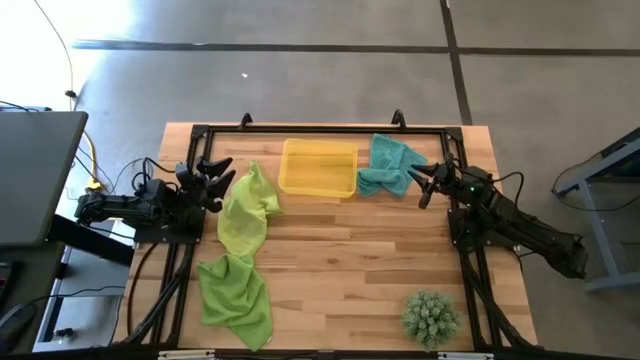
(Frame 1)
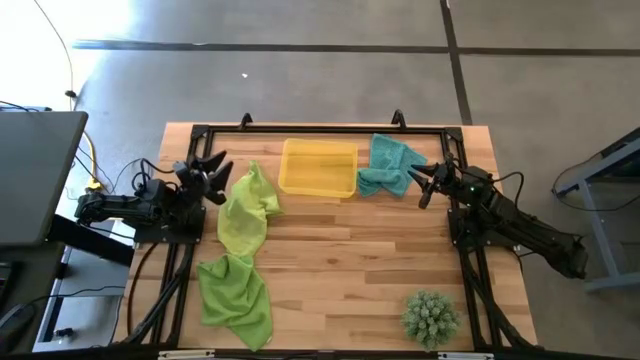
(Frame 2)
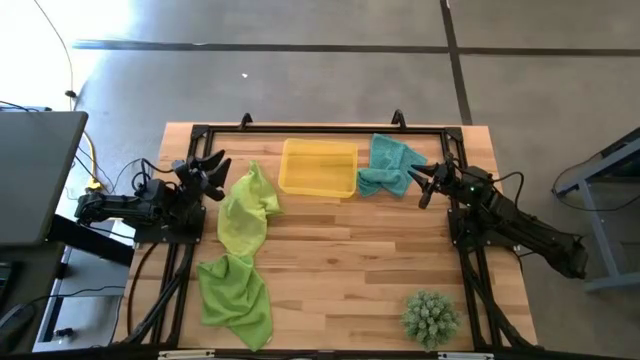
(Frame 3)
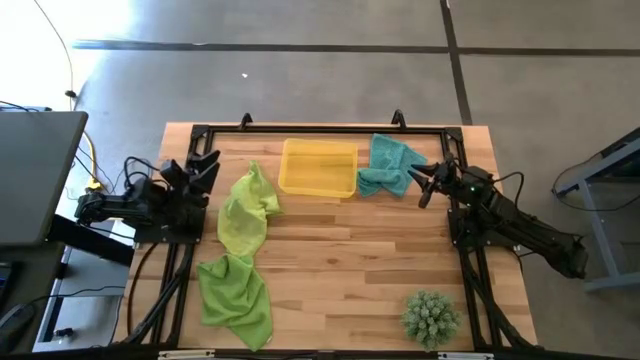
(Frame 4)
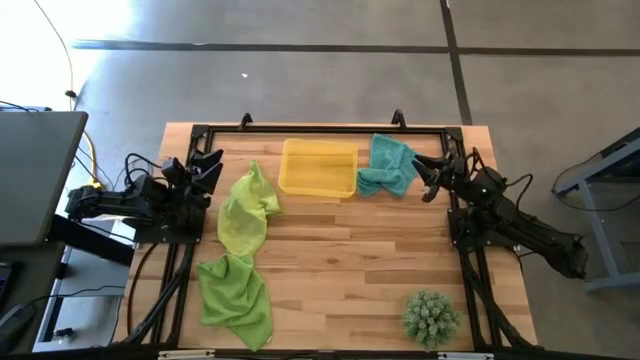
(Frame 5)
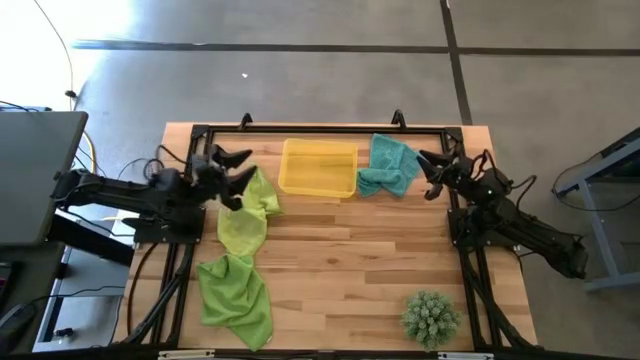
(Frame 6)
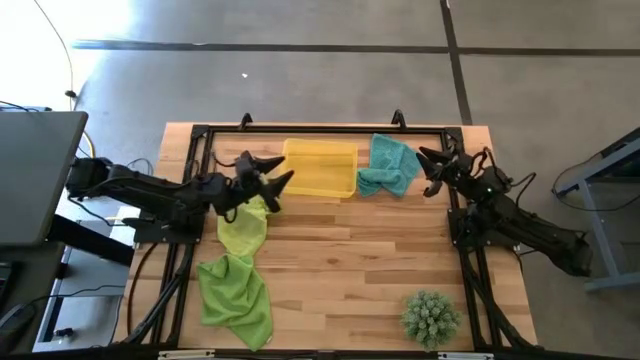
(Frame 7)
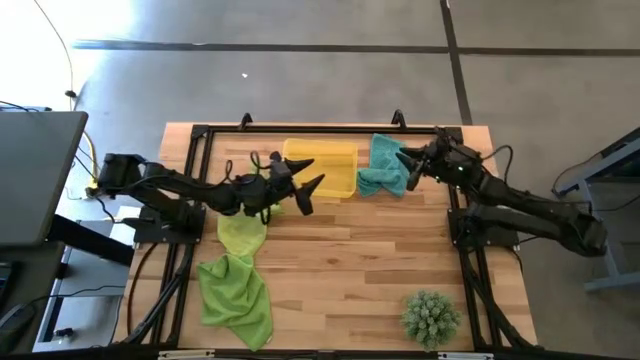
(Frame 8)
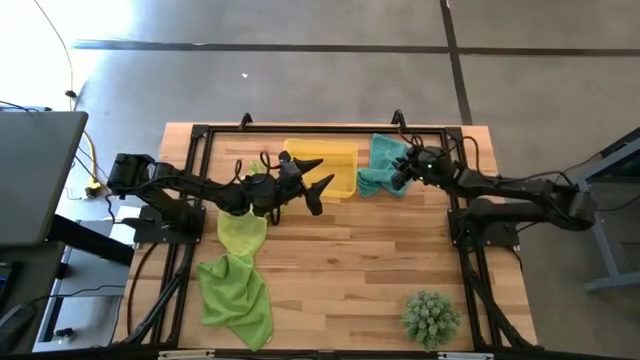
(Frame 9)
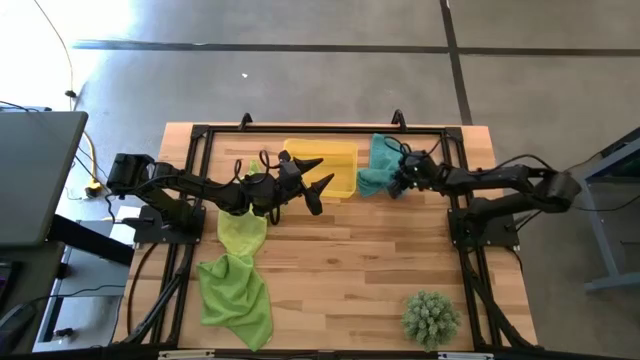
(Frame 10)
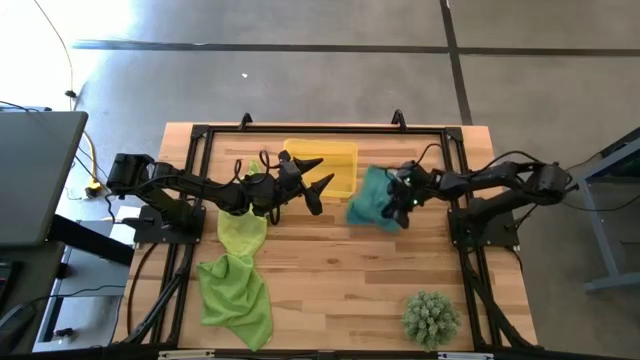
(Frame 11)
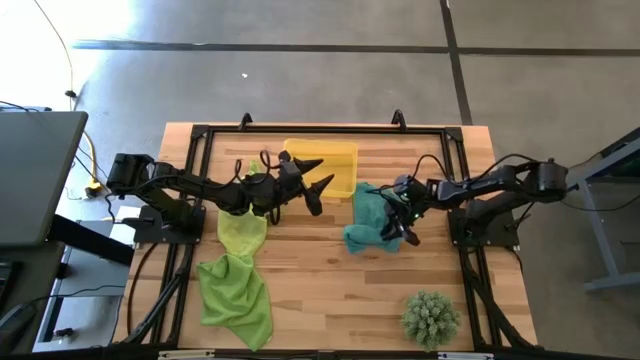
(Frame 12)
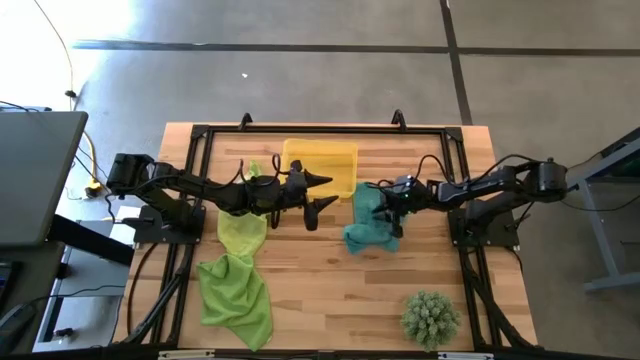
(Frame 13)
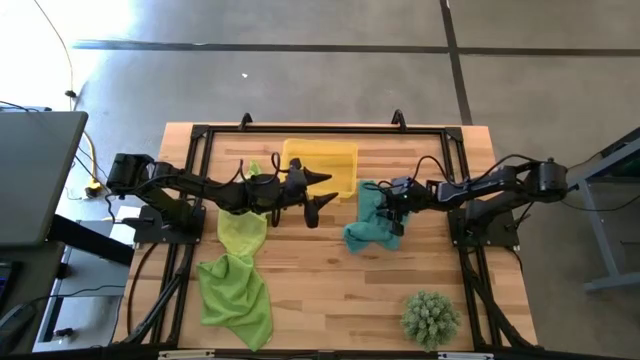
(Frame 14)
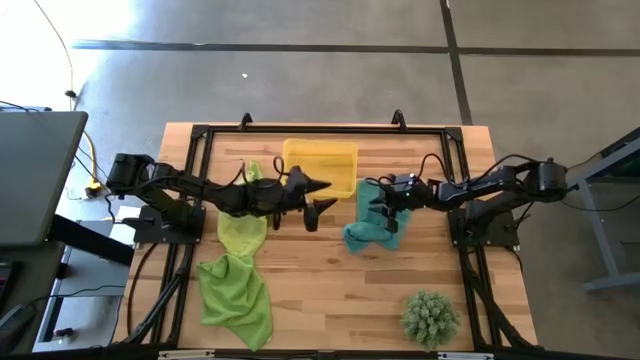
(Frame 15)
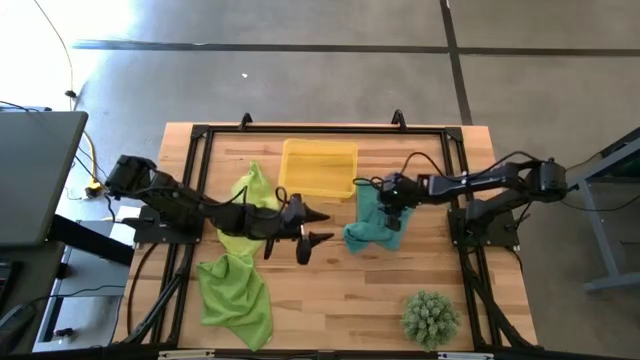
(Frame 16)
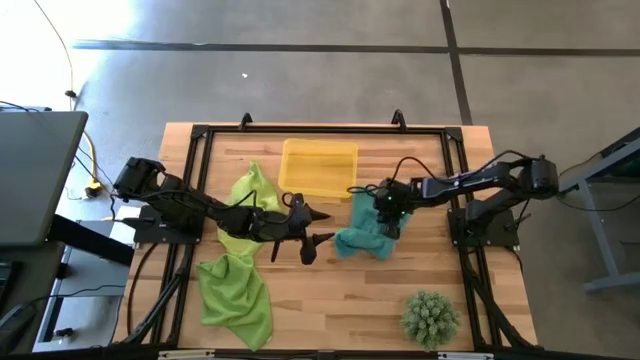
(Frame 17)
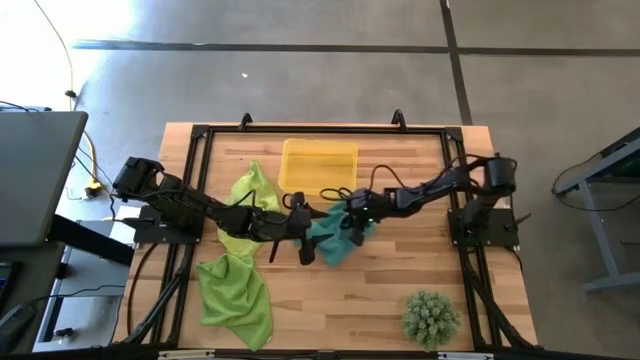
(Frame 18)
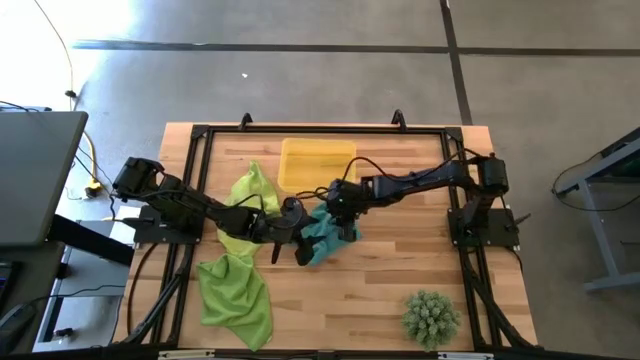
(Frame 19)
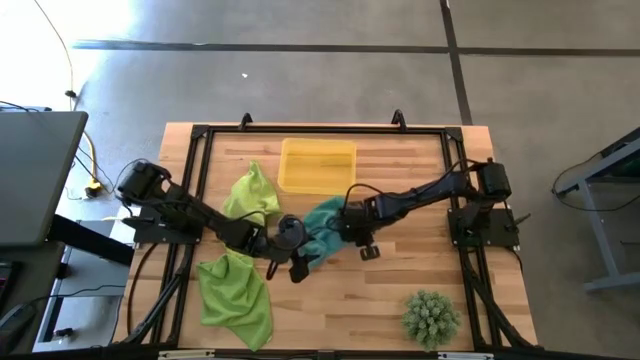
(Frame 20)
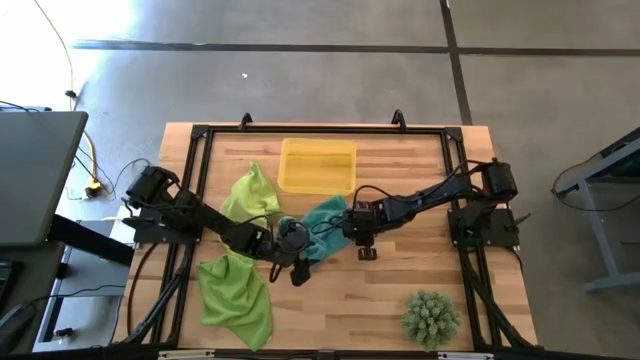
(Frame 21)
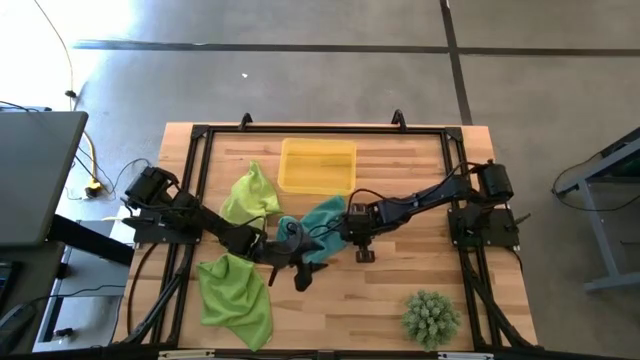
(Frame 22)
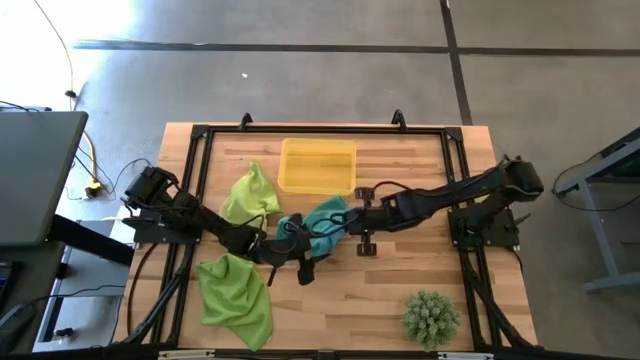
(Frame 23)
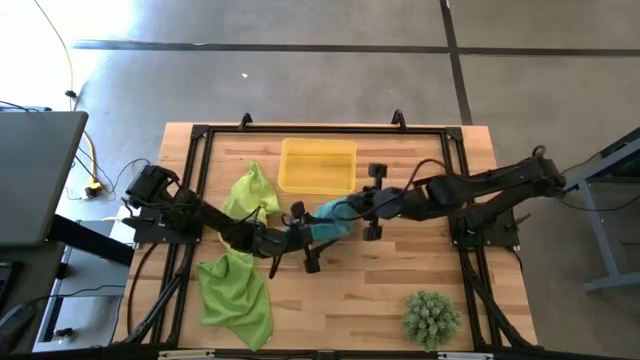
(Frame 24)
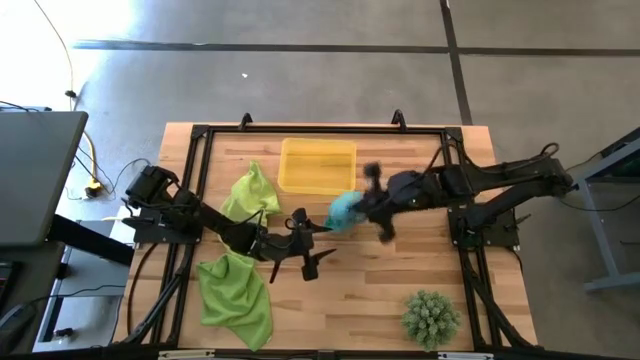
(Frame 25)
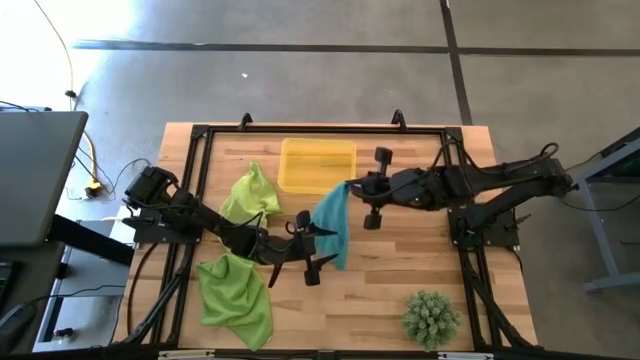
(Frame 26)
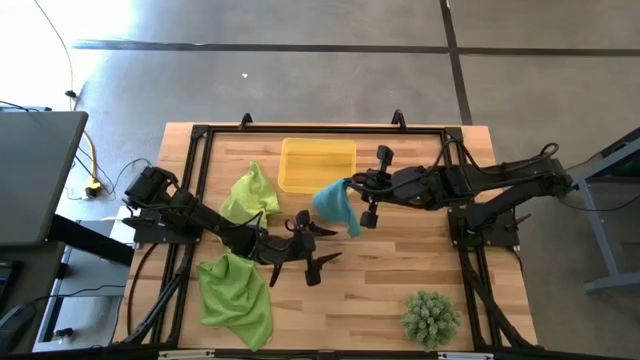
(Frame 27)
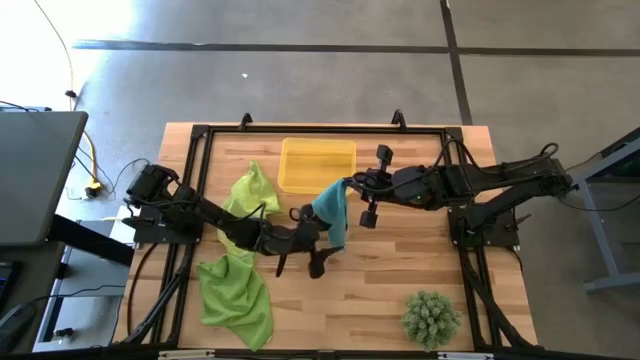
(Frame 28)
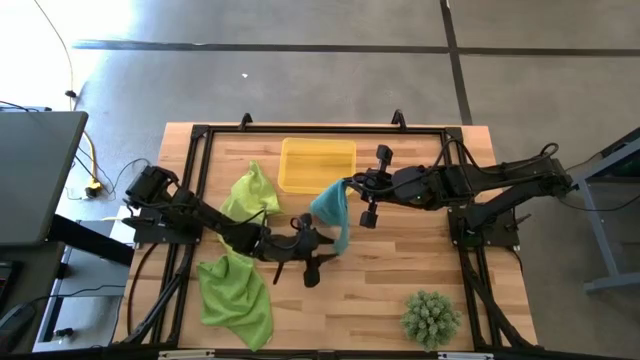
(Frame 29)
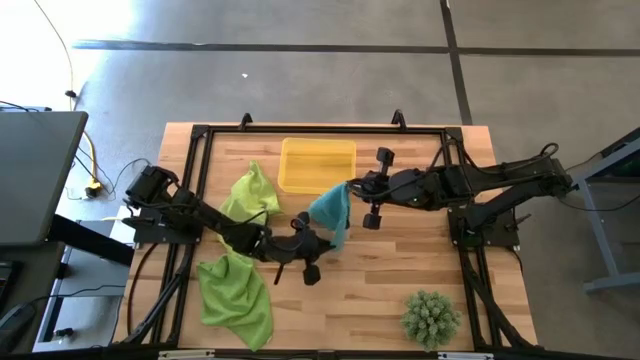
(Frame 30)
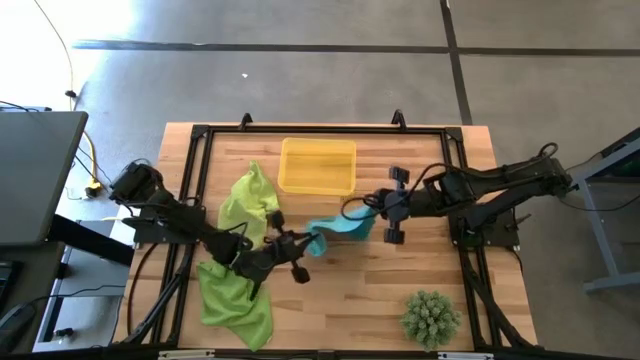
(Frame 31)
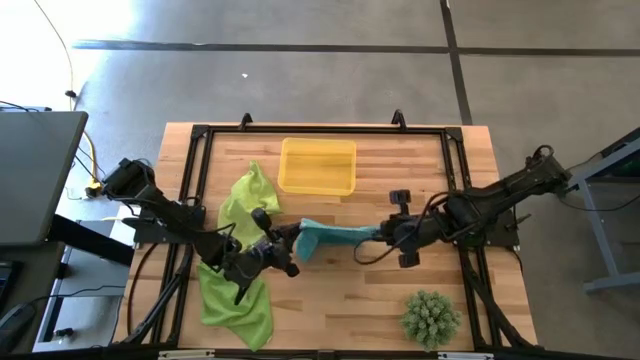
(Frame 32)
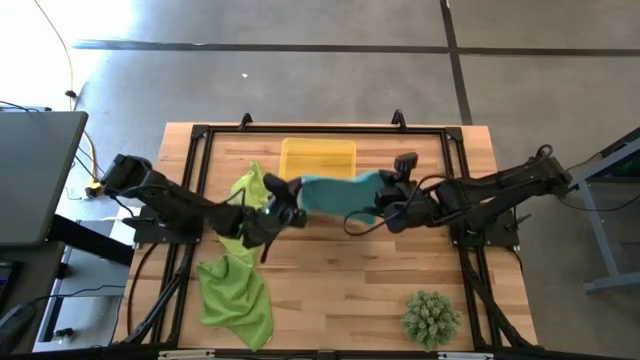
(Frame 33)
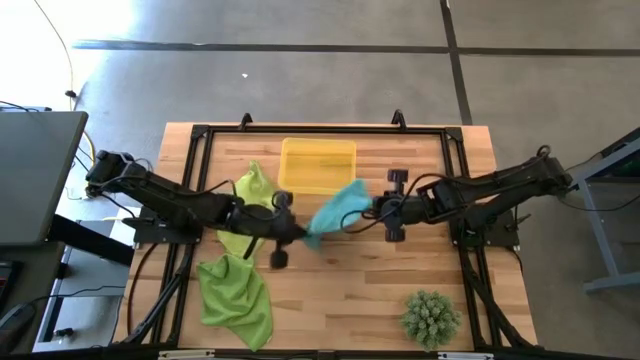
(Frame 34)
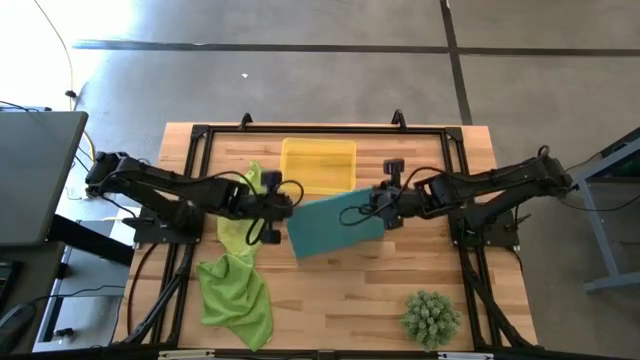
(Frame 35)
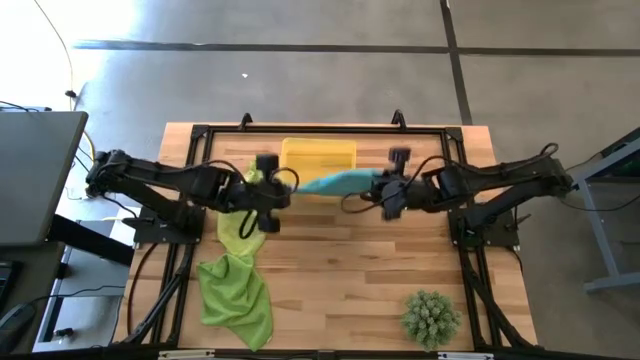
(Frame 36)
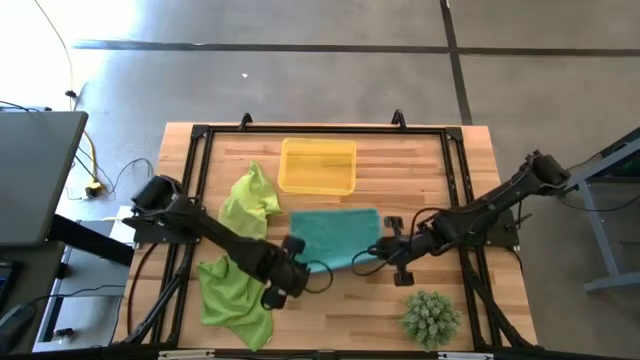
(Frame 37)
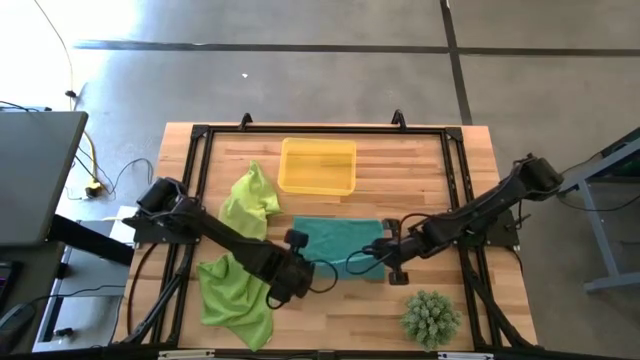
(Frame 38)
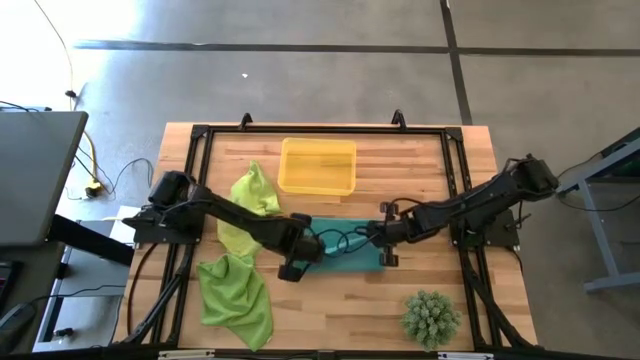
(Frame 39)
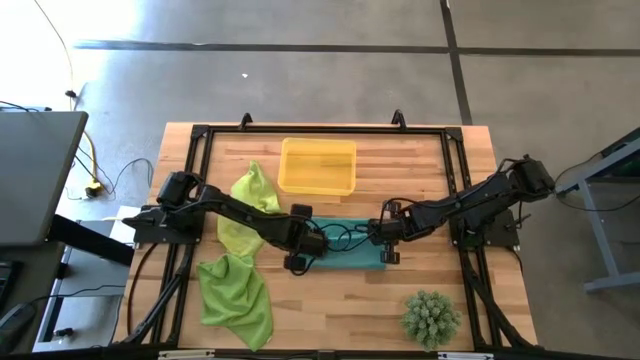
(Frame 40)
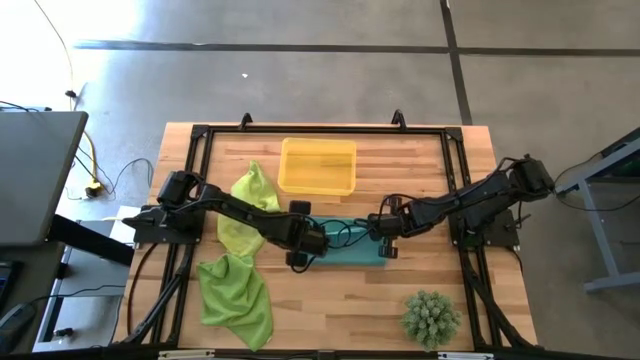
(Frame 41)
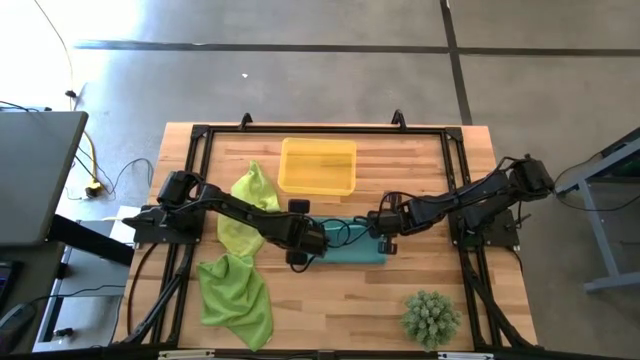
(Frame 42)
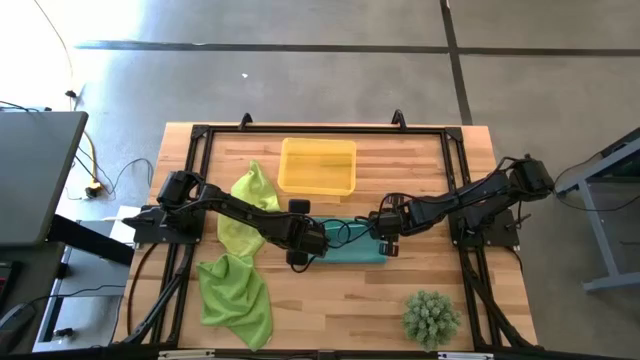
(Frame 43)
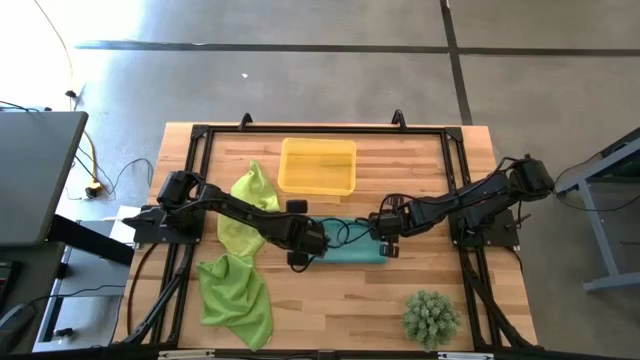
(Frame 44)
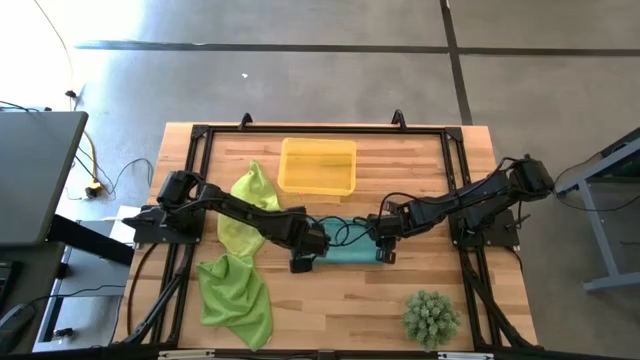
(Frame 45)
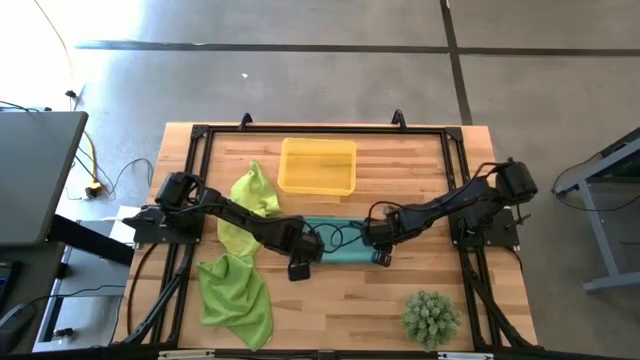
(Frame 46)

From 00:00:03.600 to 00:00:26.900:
Task: Roll microfiber towels into tight, uniform cylinder then place into a basket
Roll the blue microfiber towel
